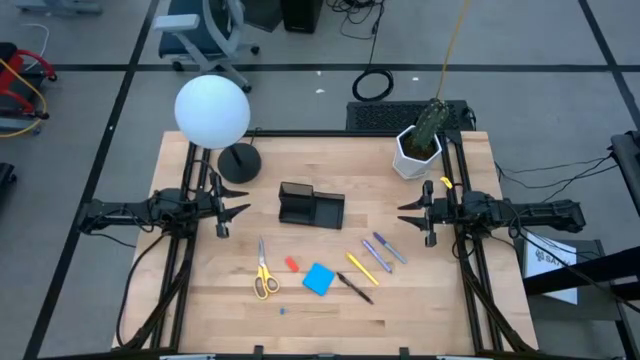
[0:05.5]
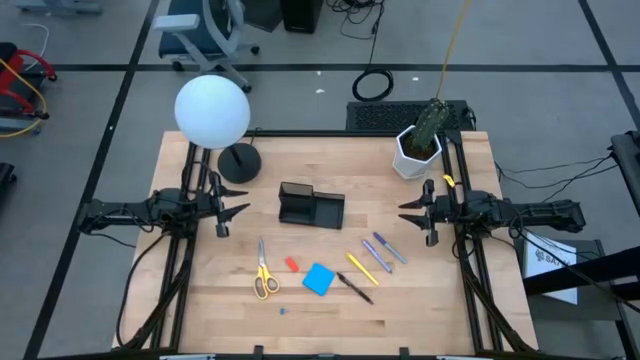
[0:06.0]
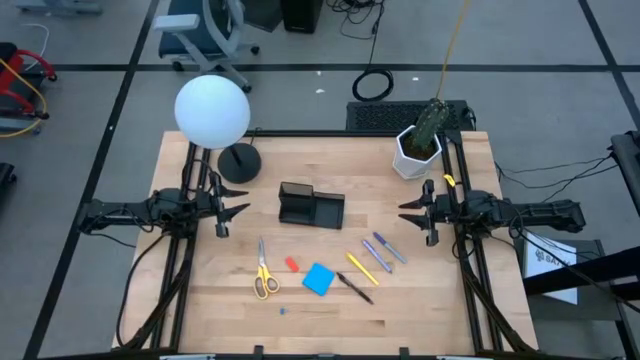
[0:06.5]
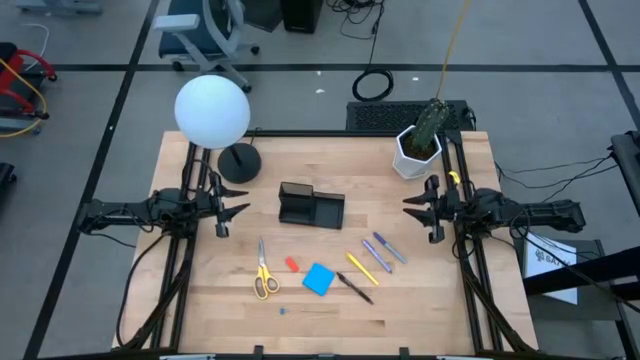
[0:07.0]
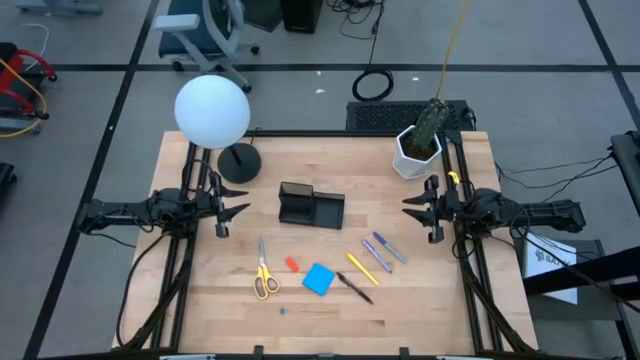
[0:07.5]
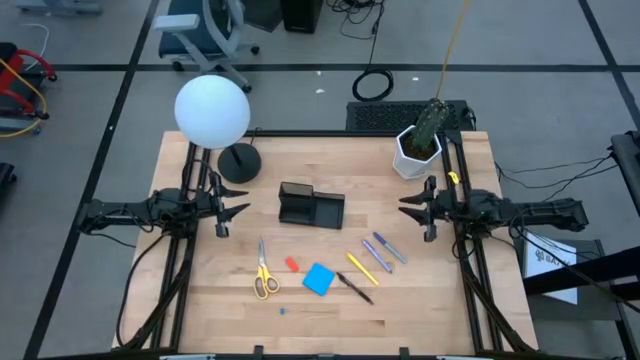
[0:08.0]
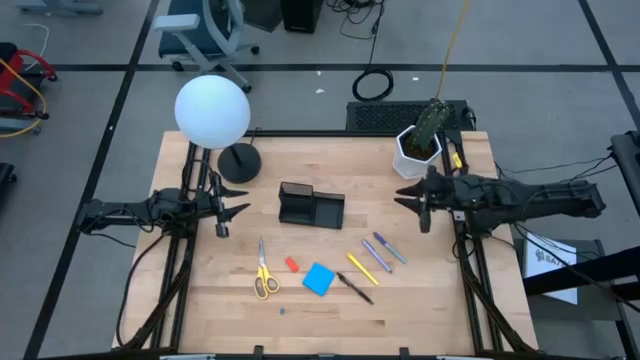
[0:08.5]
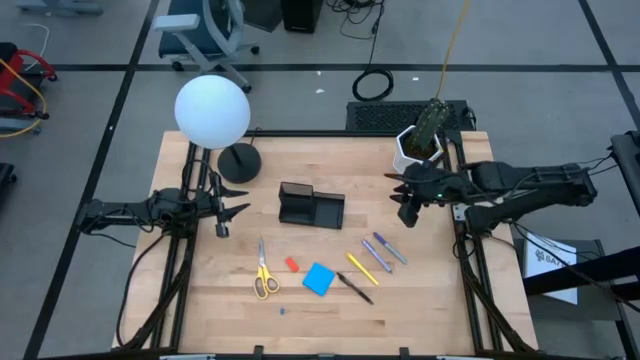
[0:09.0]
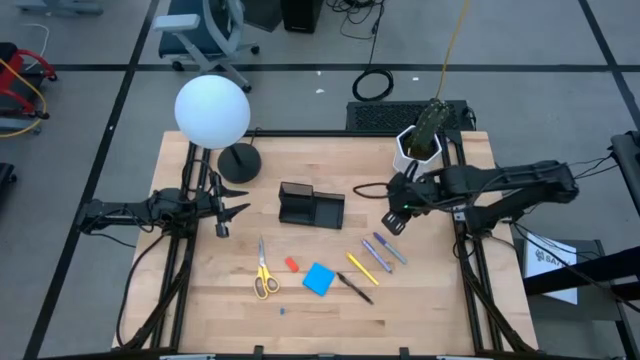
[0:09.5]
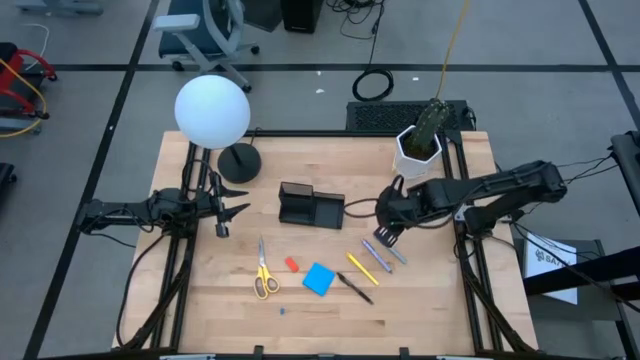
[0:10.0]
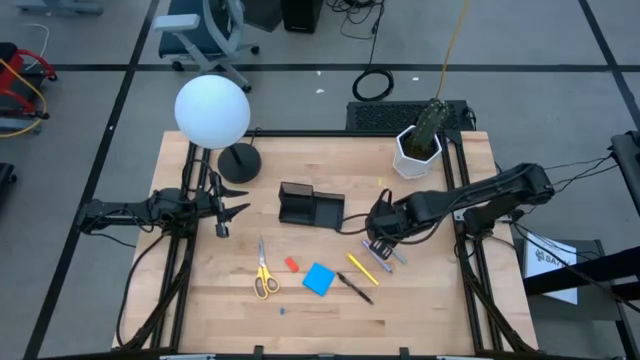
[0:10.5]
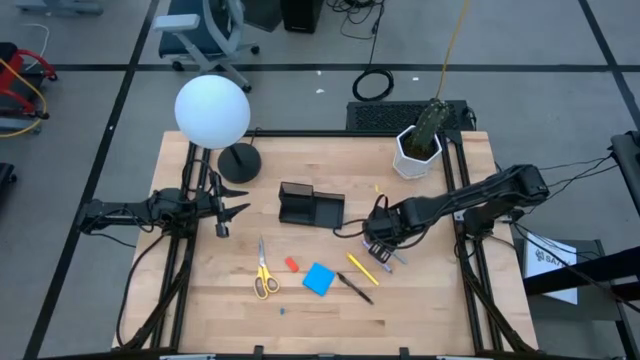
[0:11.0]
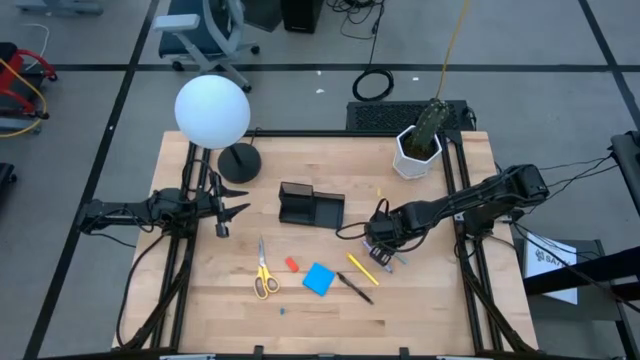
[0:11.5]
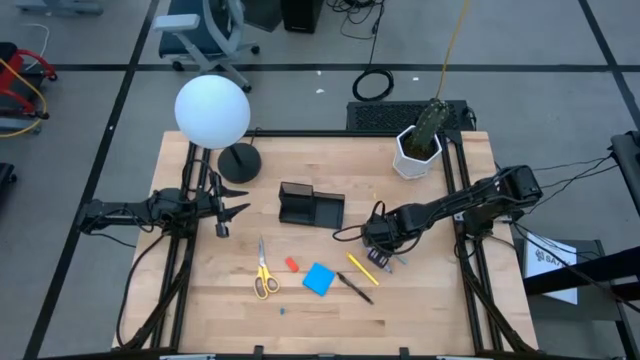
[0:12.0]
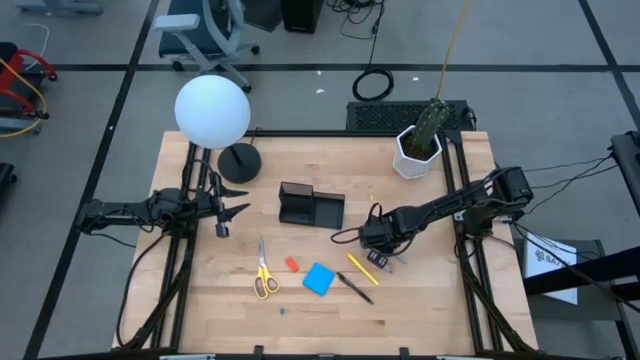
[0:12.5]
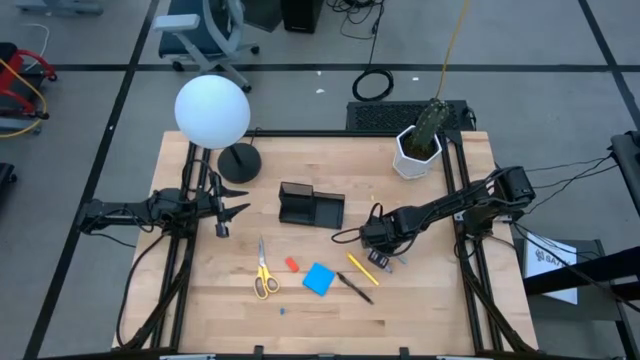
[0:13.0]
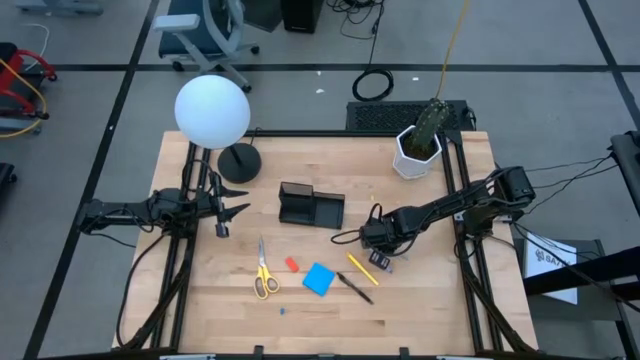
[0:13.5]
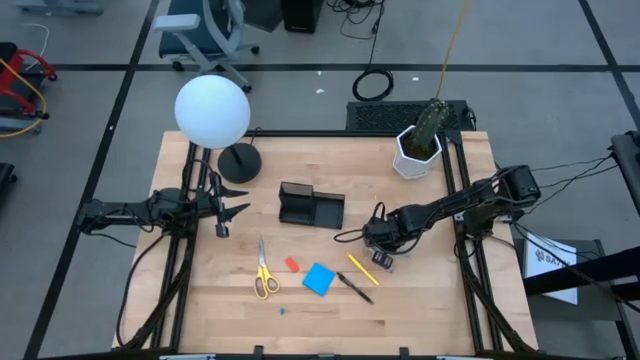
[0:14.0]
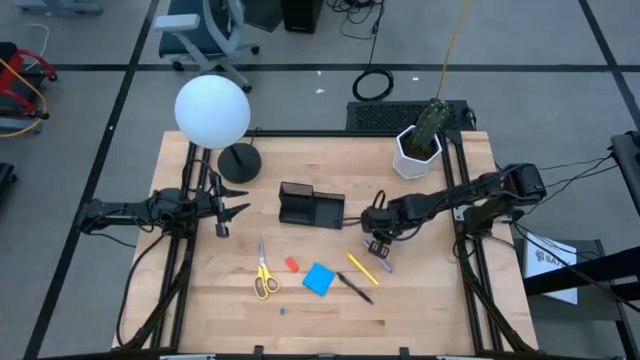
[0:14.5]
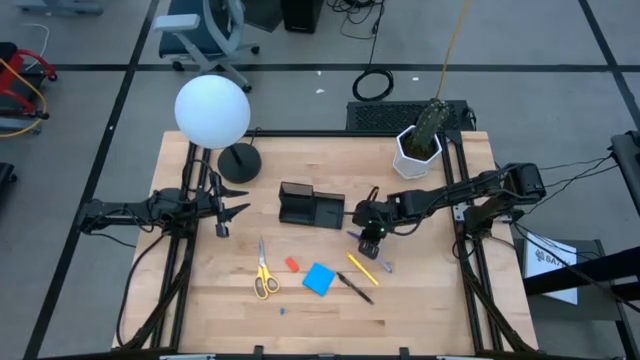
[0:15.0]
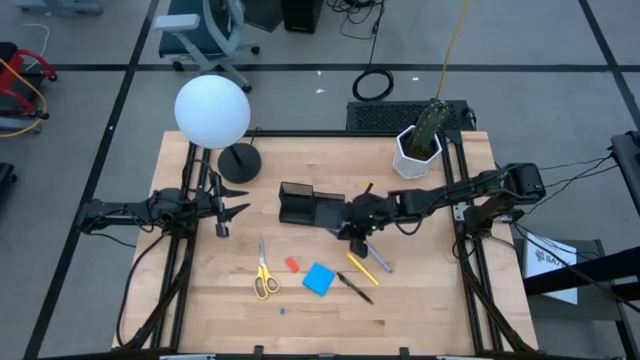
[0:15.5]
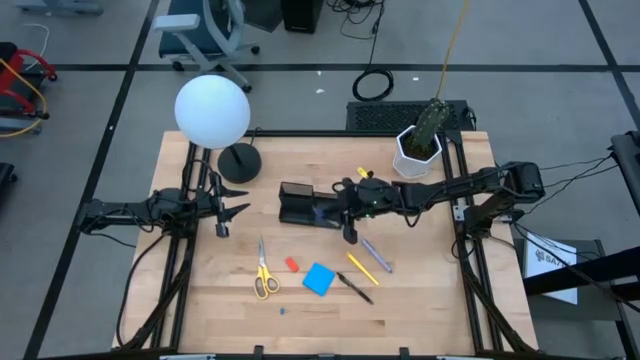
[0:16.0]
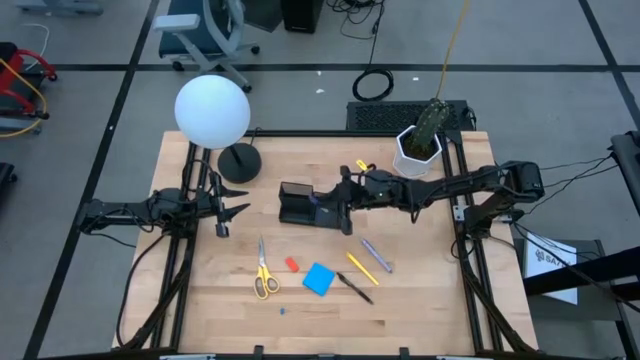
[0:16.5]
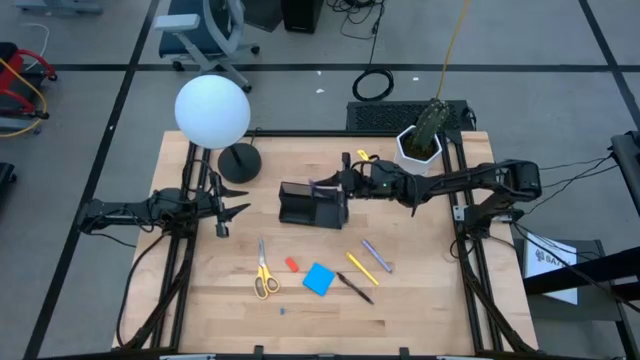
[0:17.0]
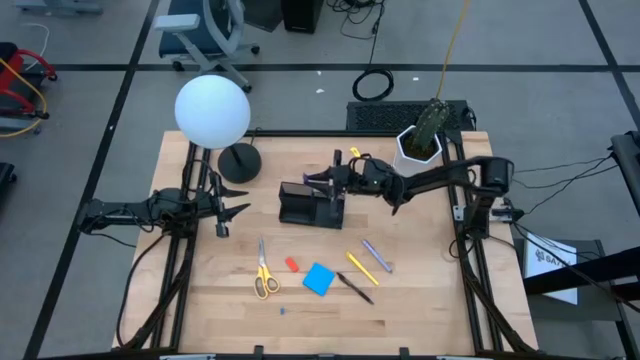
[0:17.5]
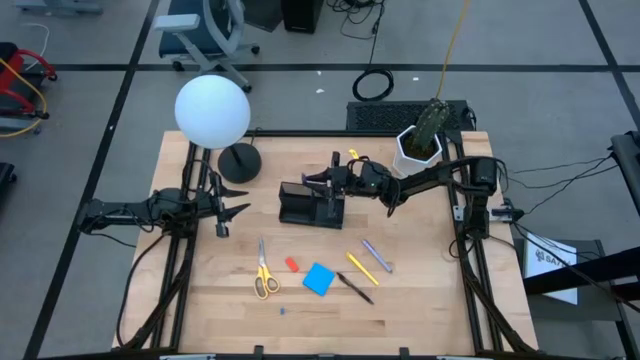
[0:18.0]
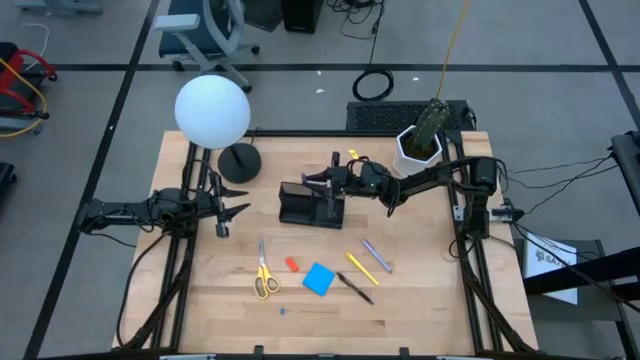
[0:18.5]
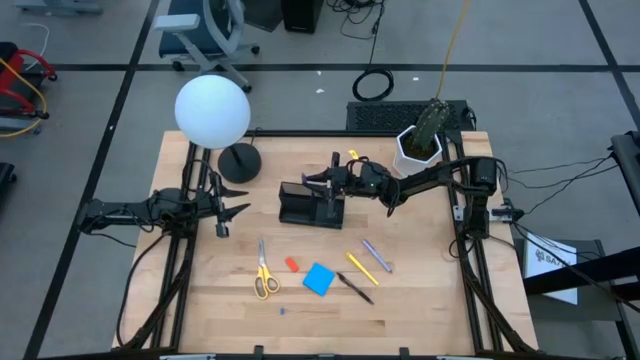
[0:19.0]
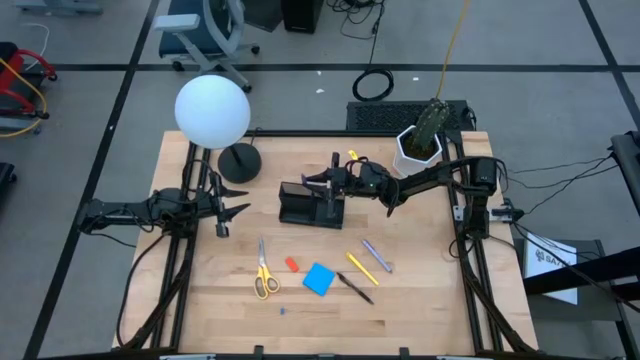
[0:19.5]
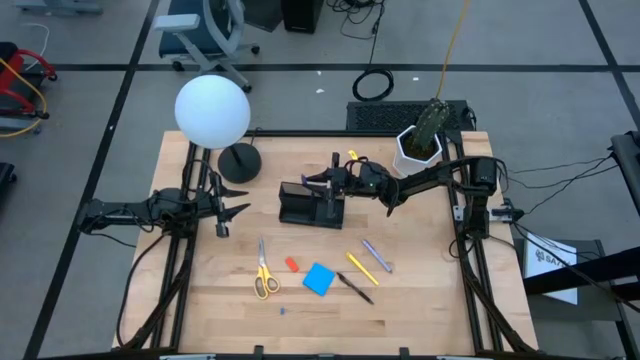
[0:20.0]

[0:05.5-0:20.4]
Task: Pick and place office supplies into organizer
Put the blue pen into the black desk organizer

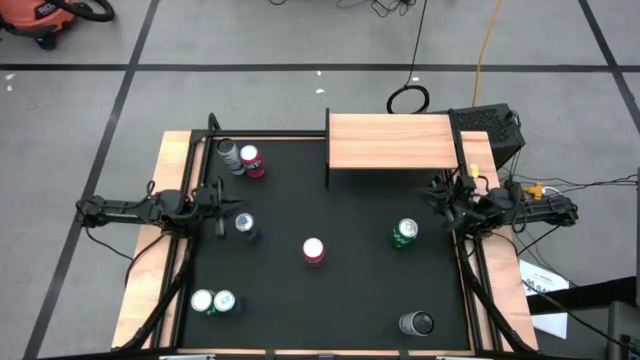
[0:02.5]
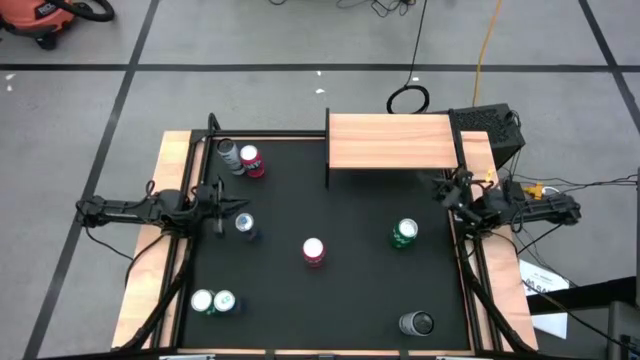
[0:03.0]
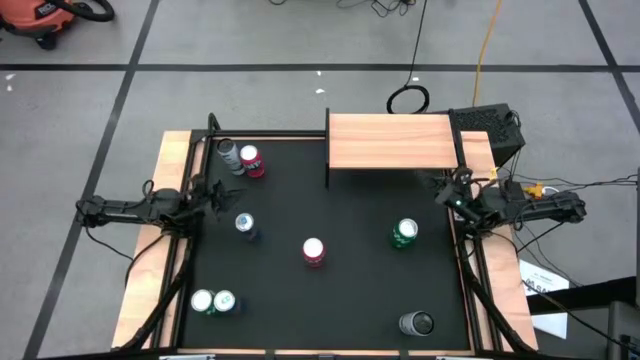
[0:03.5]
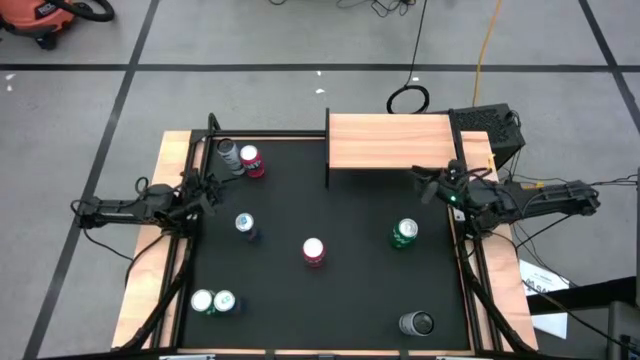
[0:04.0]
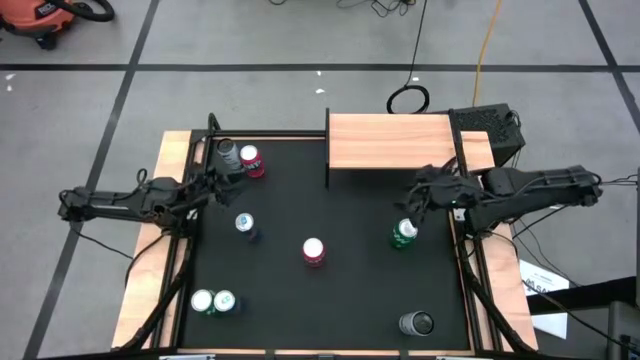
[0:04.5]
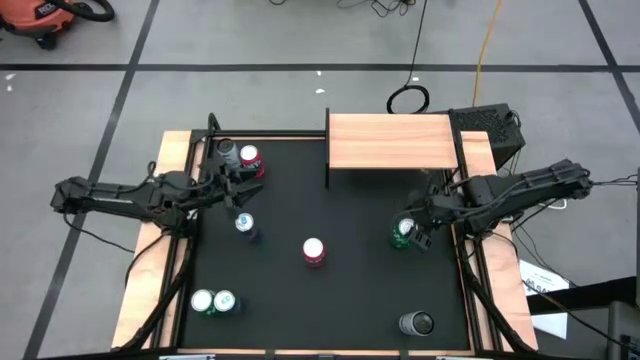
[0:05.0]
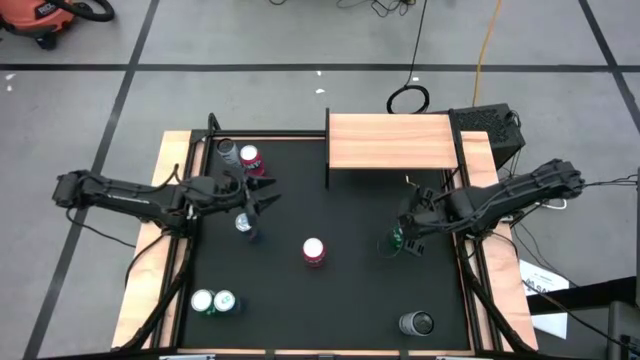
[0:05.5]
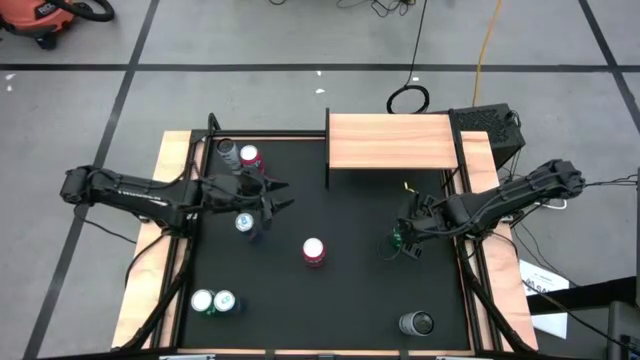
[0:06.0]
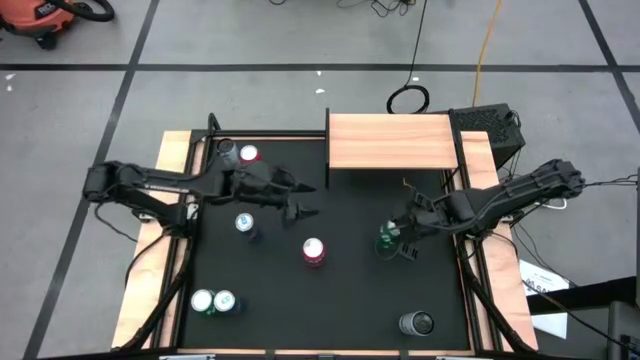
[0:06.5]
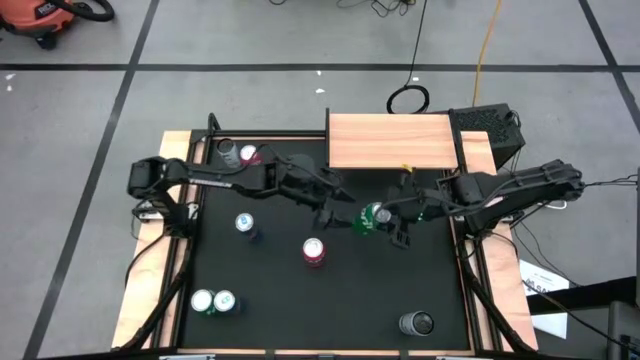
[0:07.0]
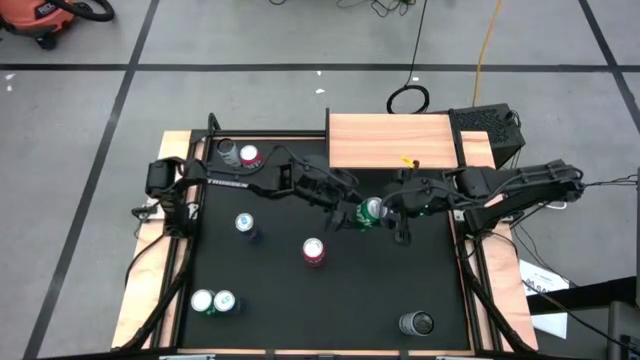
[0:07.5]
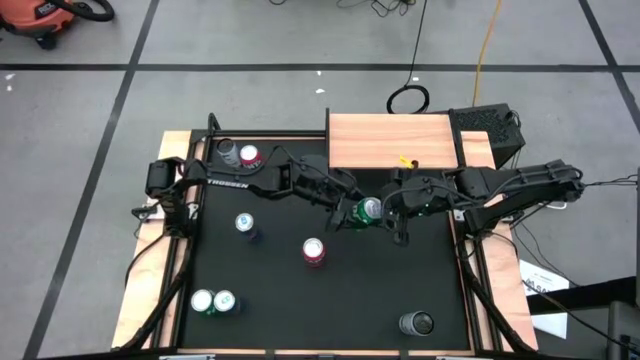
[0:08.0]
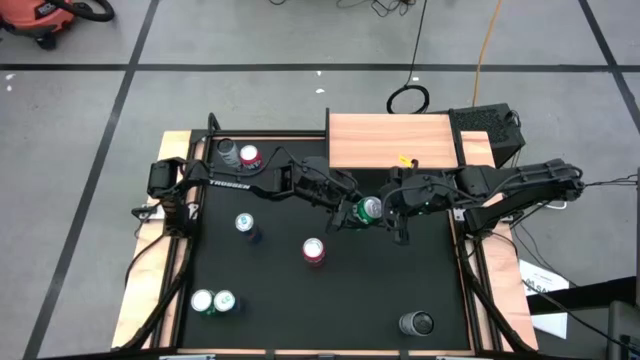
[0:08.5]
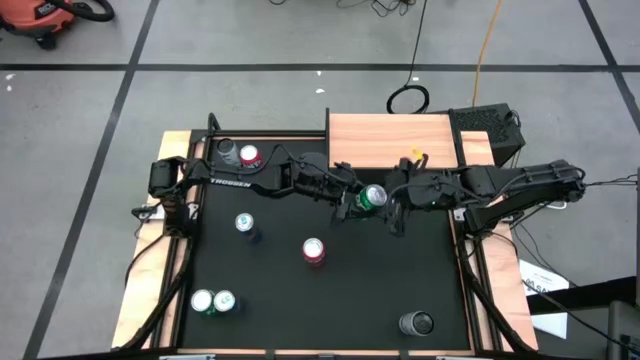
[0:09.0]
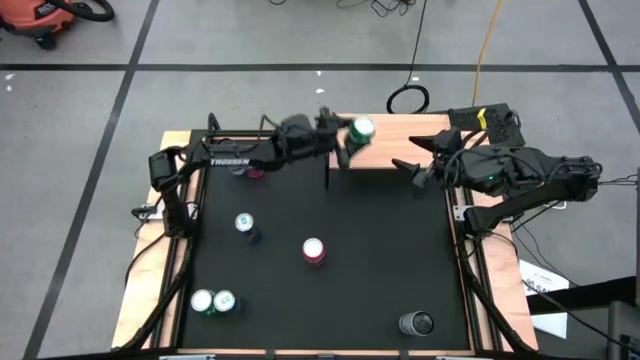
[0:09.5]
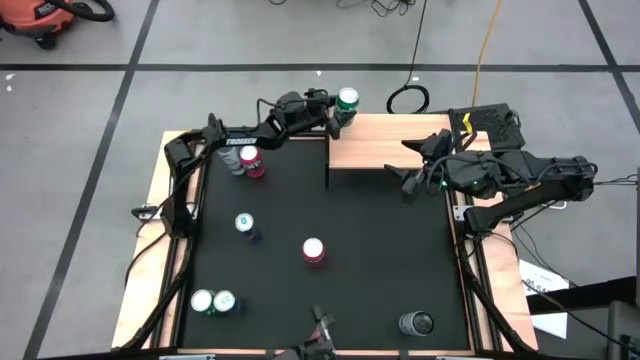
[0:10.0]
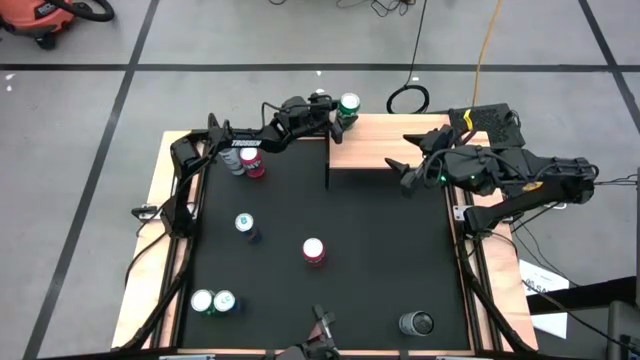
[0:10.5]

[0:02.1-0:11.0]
Task: Place canned beverage on shelf
Put the right green soda can on the shelf
